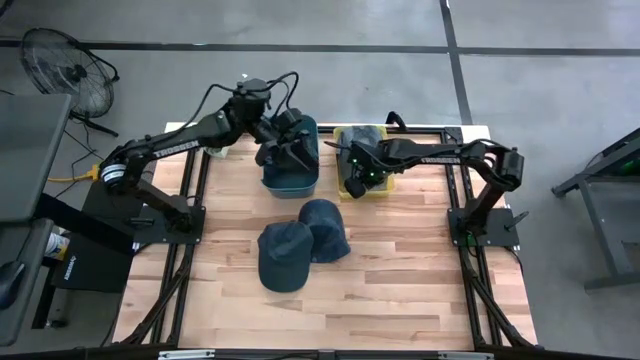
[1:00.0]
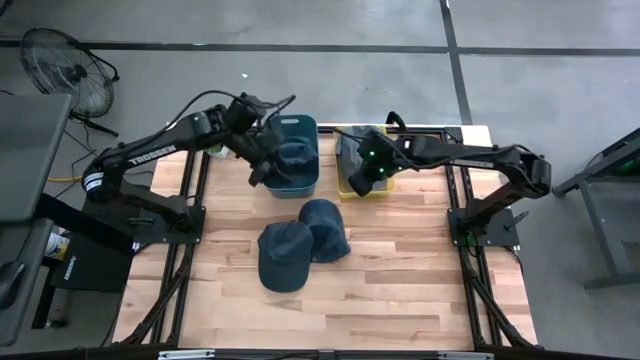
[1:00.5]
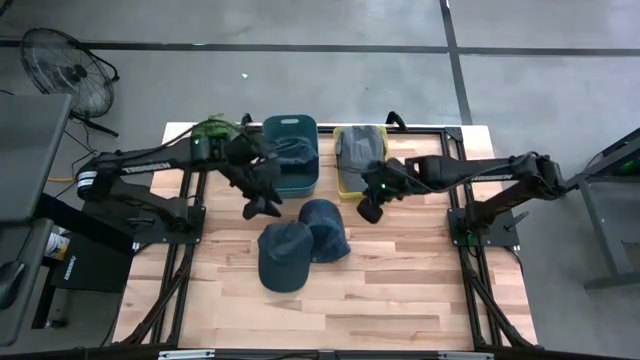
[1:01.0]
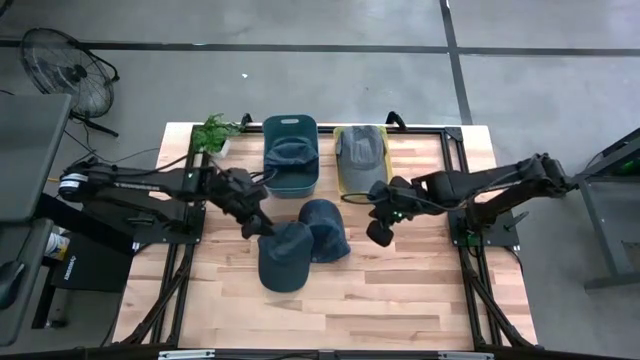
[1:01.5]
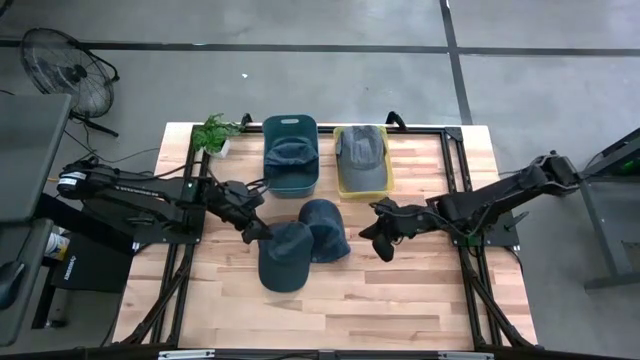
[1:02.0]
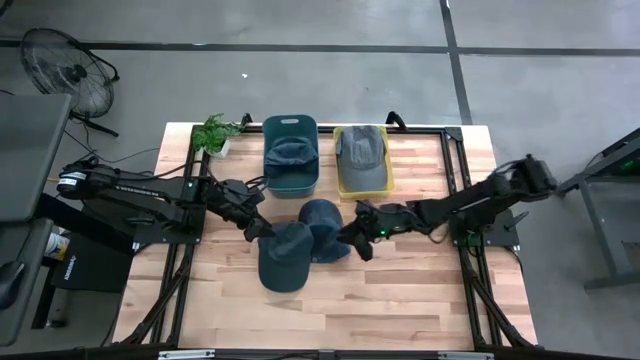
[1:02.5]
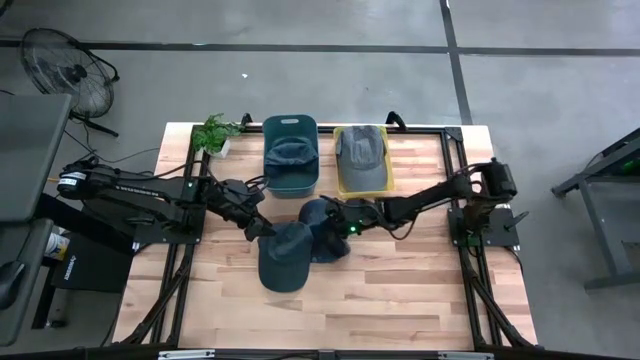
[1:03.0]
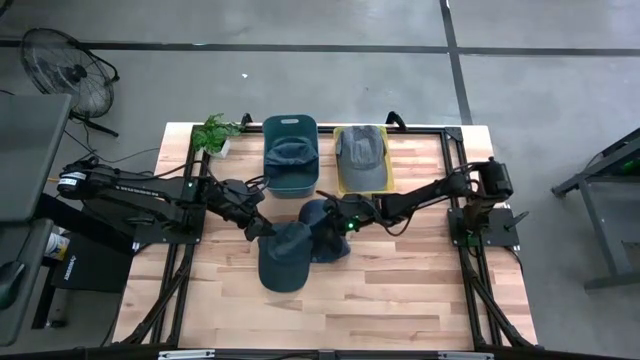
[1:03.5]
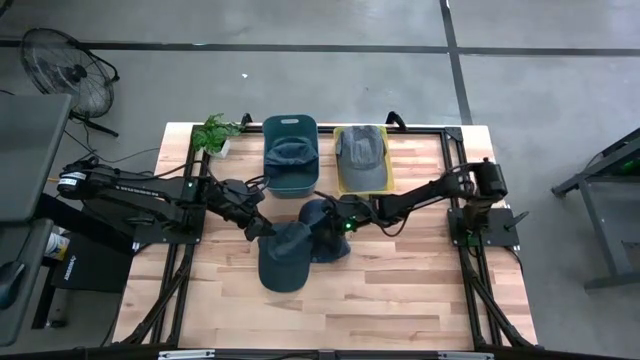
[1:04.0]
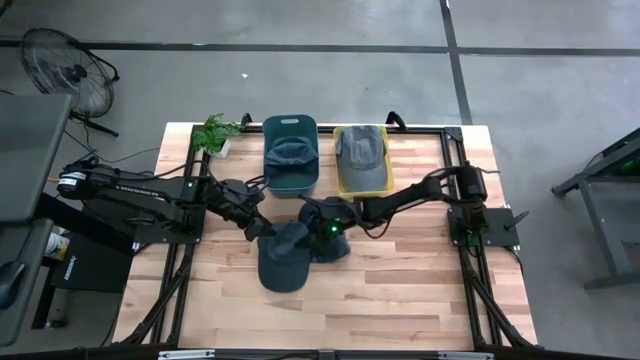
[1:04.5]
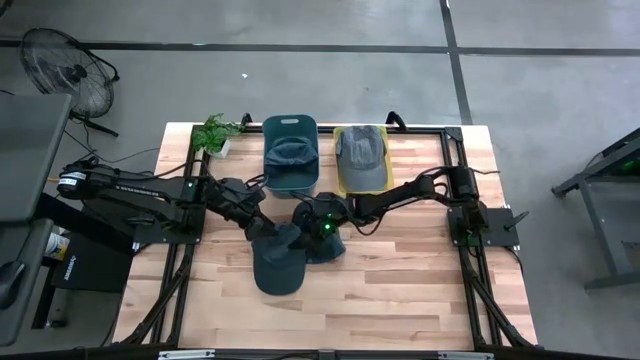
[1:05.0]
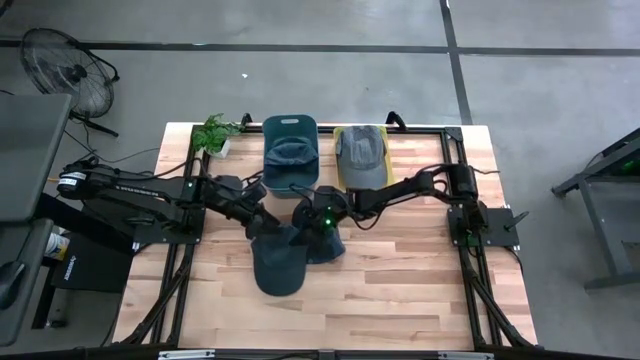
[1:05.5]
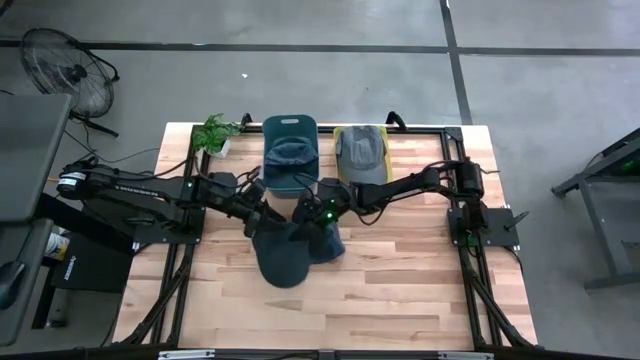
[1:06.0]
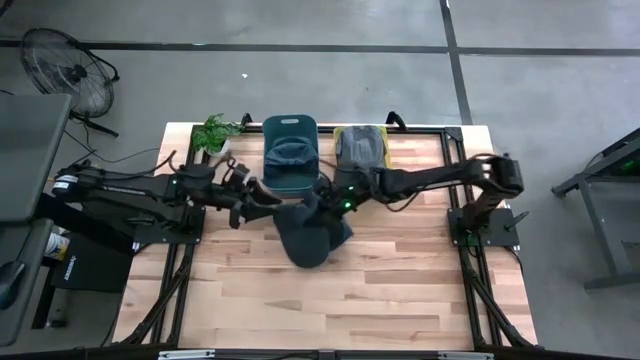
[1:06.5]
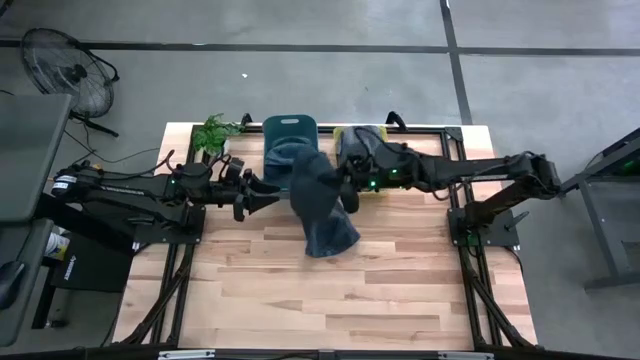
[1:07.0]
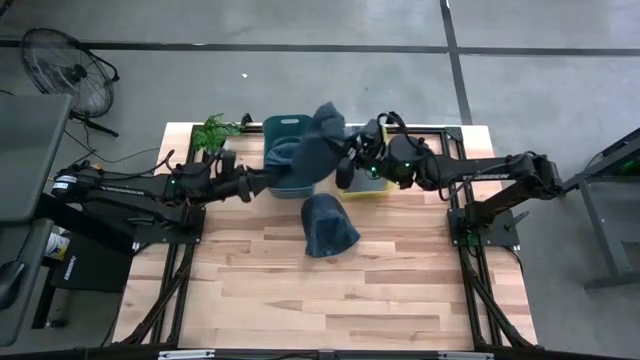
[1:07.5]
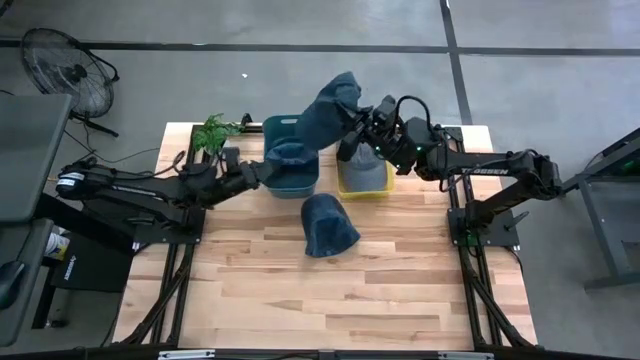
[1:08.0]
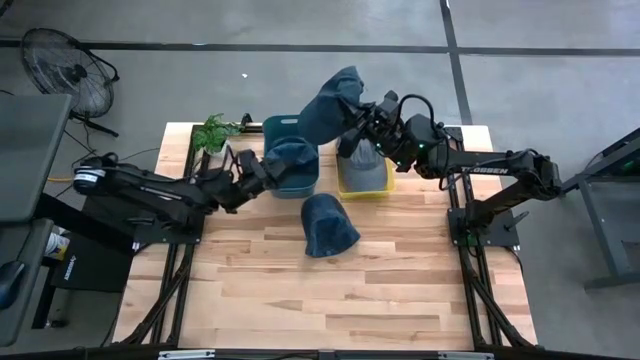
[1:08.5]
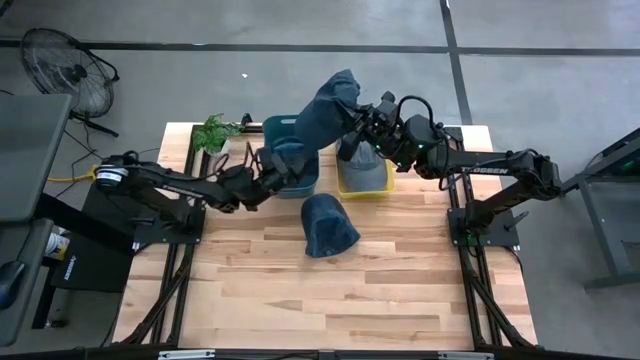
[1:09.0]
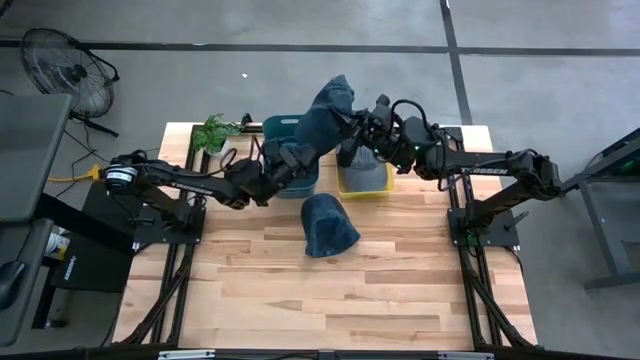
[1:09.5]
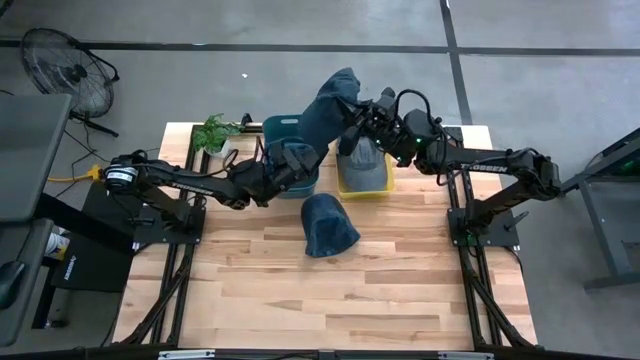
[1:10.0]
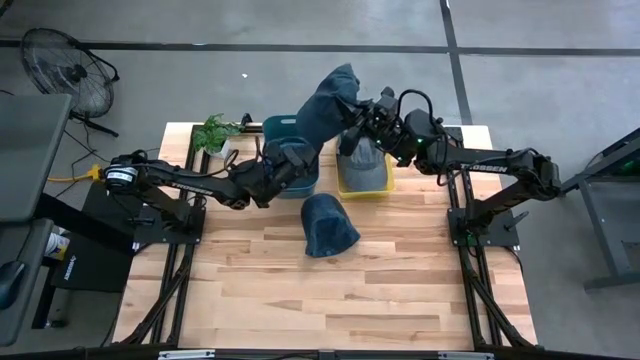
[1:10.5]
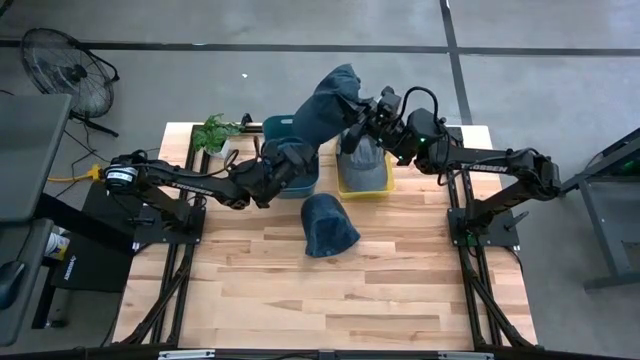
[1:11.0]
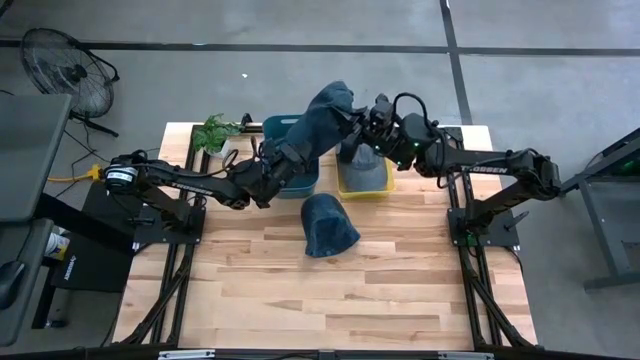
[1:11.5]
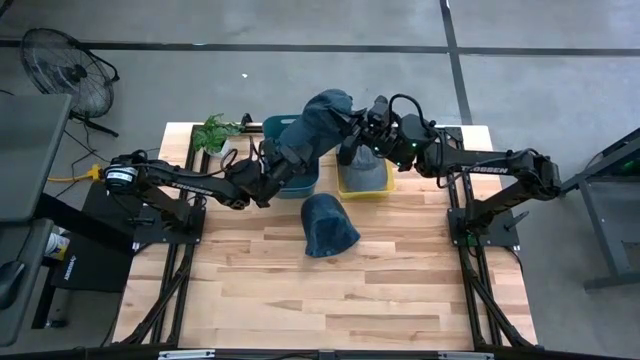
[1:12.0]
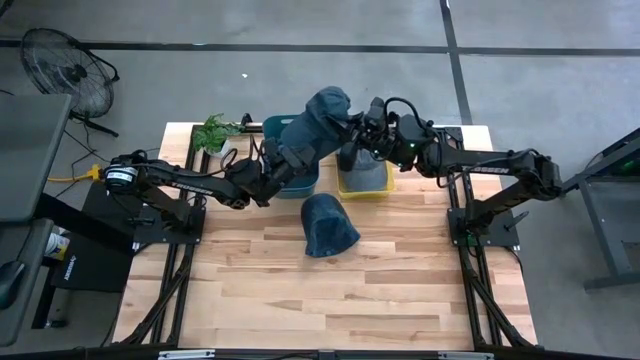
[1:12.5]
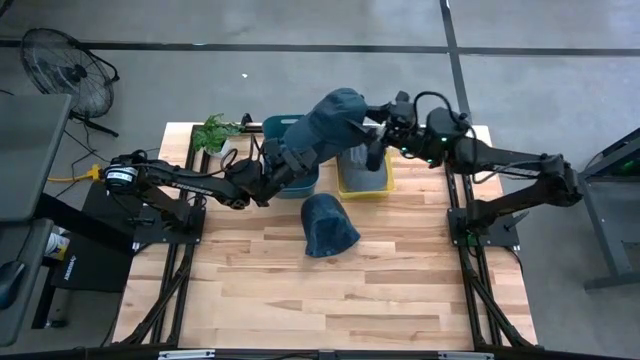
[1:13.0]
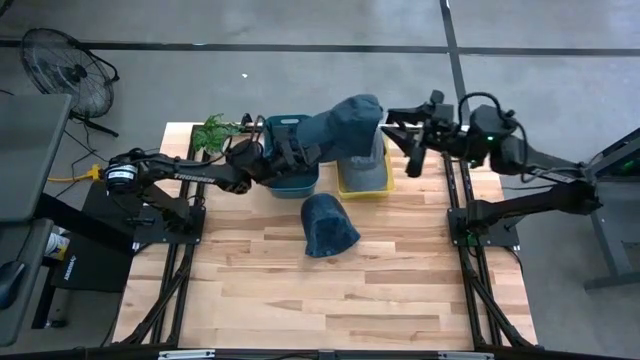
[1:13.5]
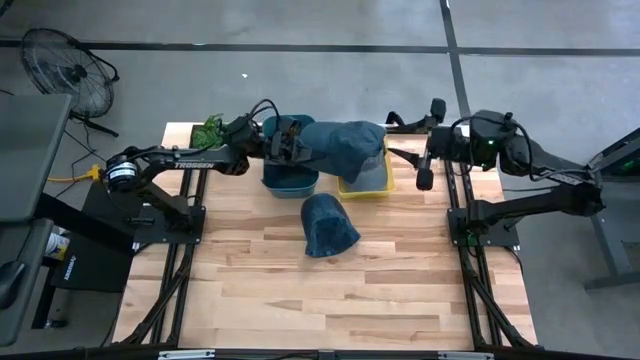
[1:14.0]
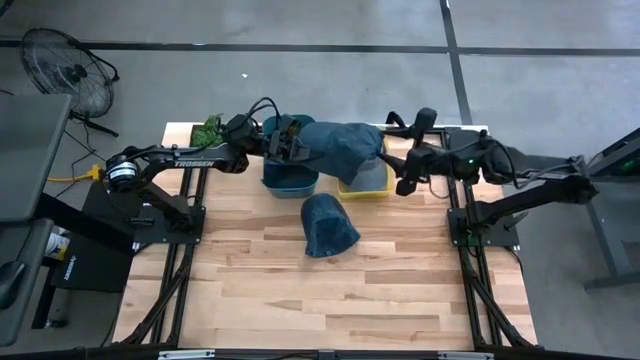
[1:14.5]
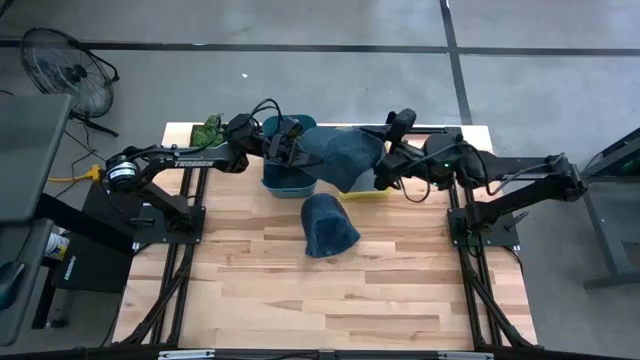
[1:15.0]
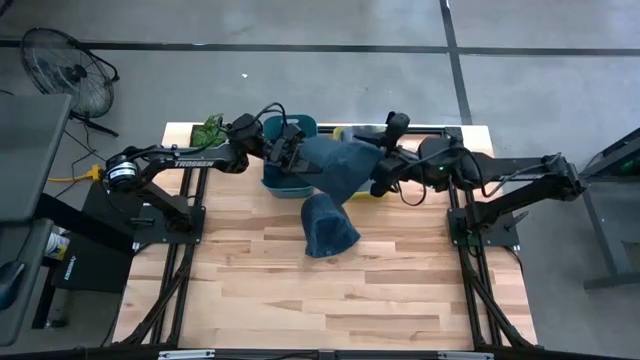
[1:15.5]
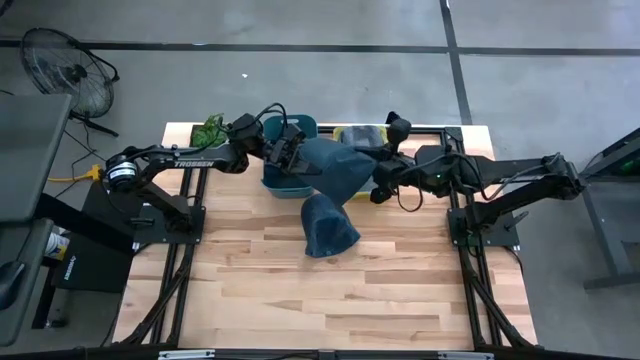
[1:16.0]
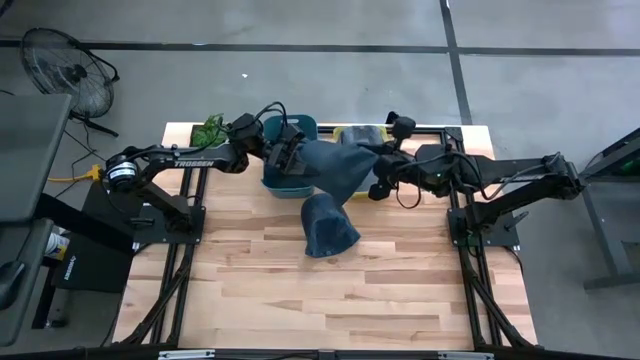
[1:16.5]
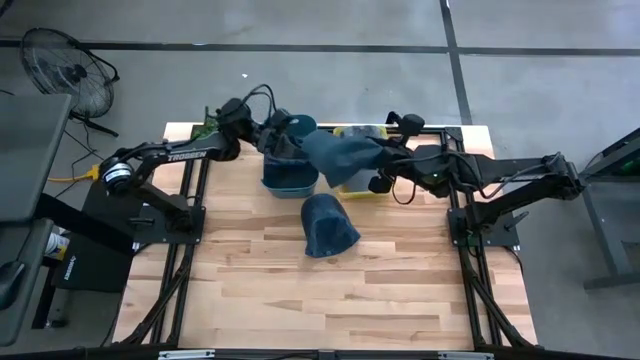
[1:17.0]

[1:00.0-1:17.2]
Task: Pick & Place hat
Put the left blue cap into the blue bin

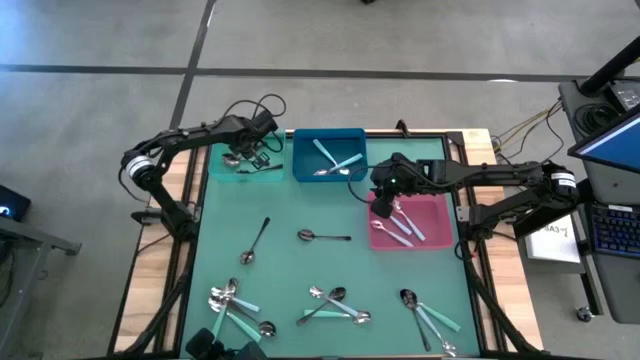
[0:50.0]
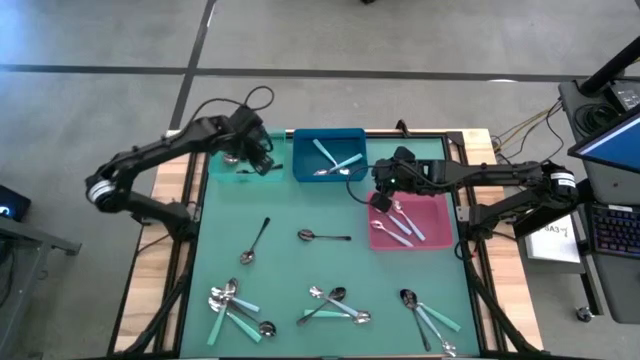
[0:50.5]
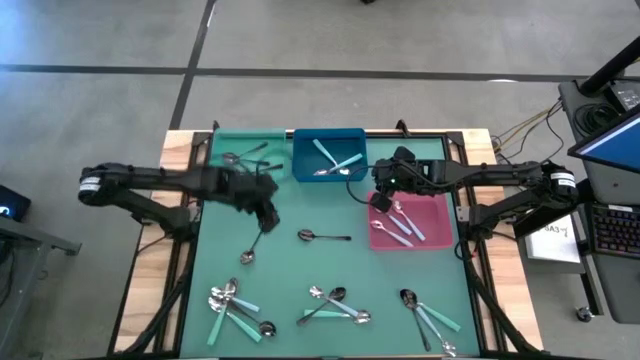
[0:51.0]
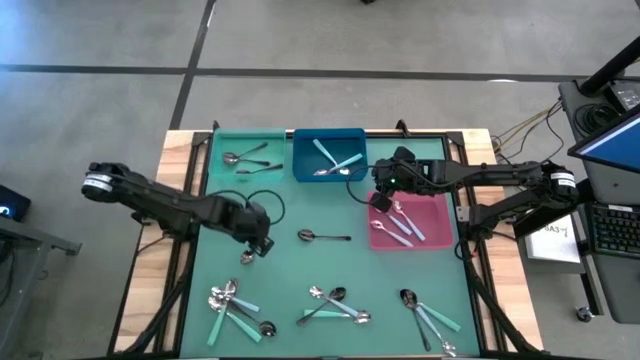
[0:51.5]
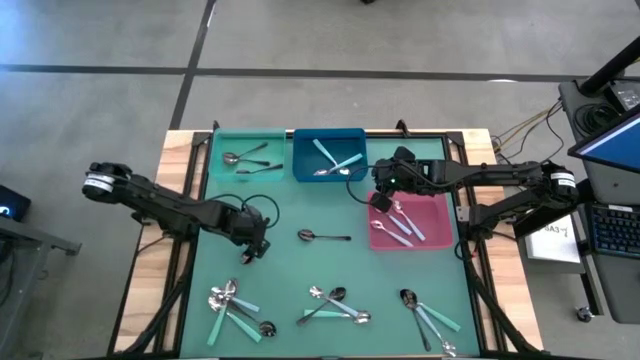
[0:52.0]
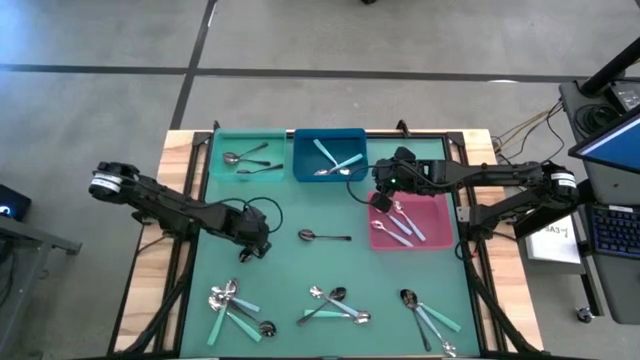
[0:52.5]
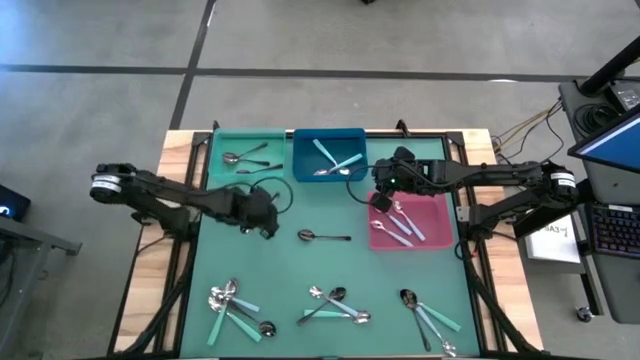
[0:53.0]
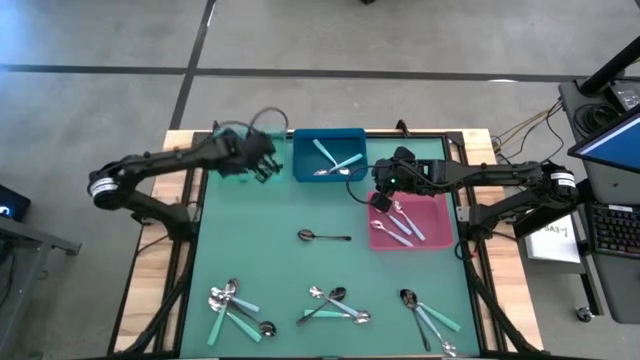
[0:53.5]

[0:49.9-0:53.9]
Task: Sort silverware by color (type)
Put the black spoon into the green bin
